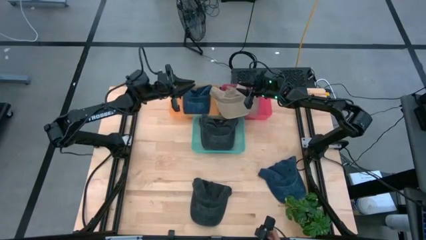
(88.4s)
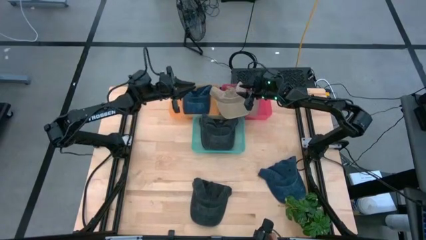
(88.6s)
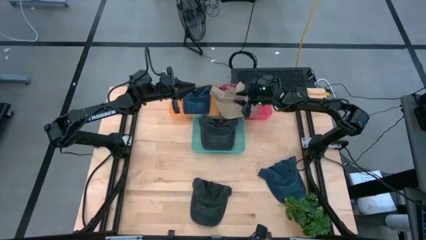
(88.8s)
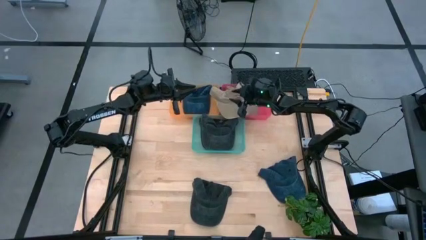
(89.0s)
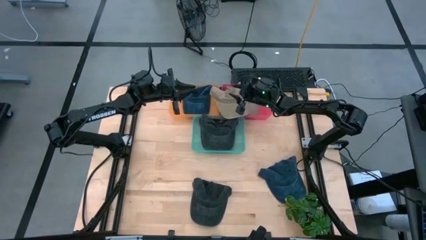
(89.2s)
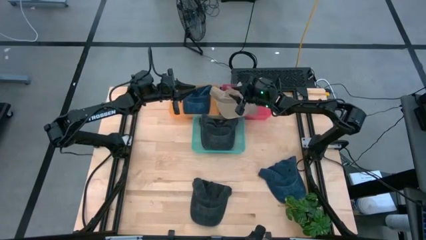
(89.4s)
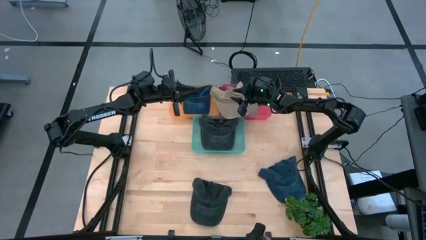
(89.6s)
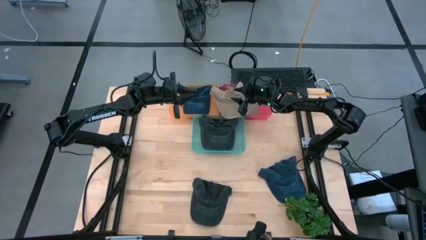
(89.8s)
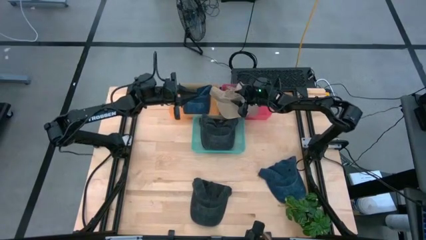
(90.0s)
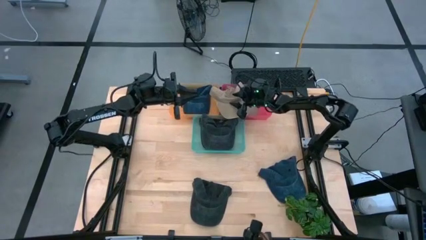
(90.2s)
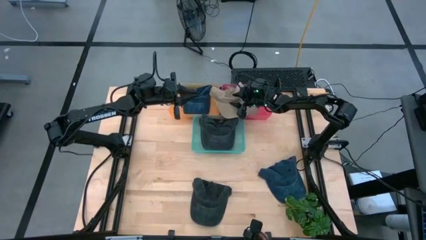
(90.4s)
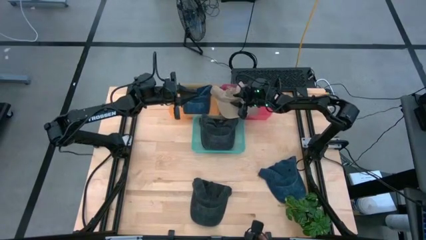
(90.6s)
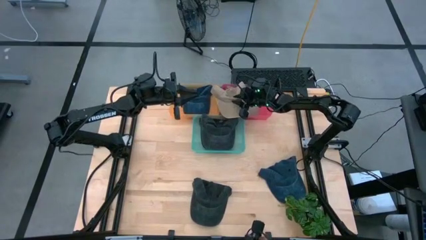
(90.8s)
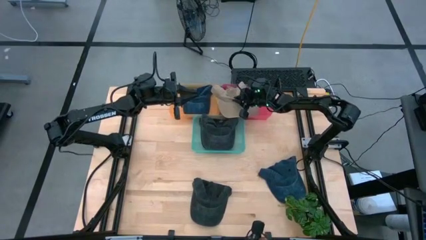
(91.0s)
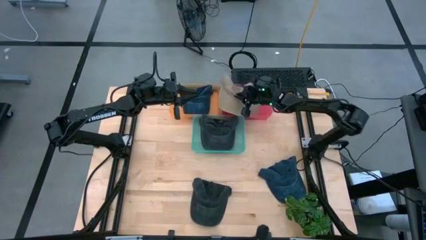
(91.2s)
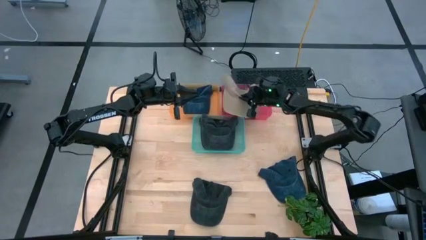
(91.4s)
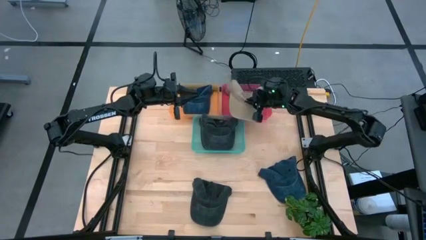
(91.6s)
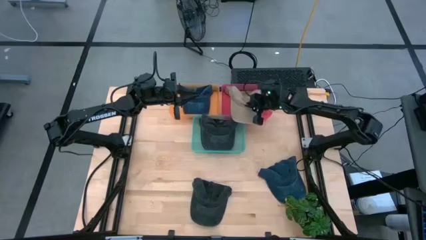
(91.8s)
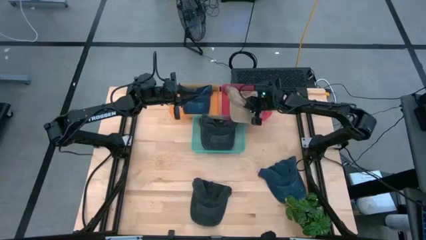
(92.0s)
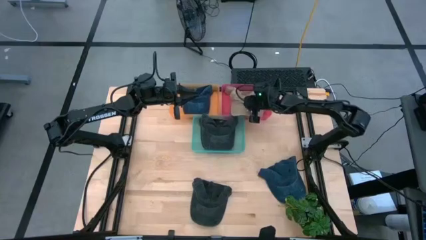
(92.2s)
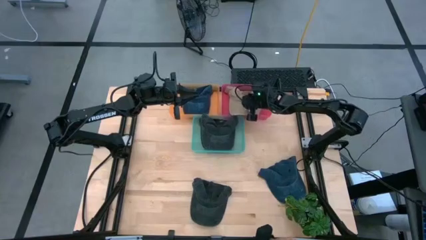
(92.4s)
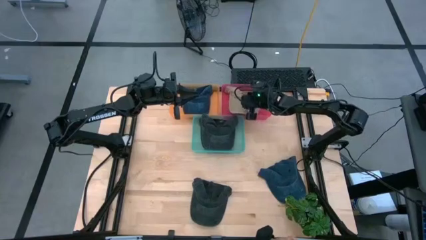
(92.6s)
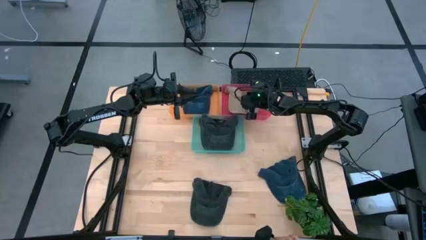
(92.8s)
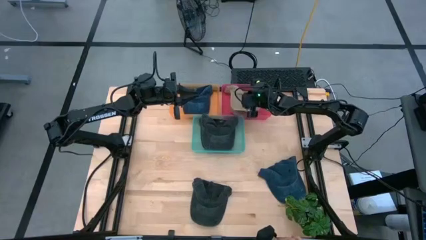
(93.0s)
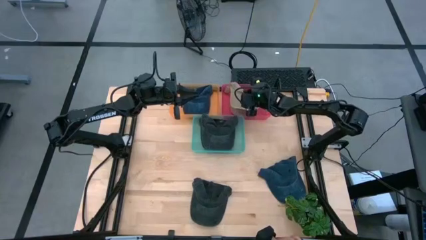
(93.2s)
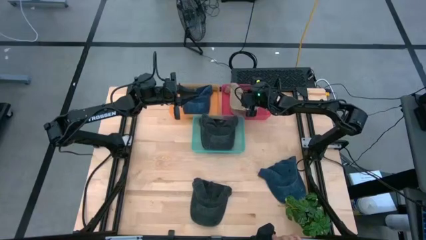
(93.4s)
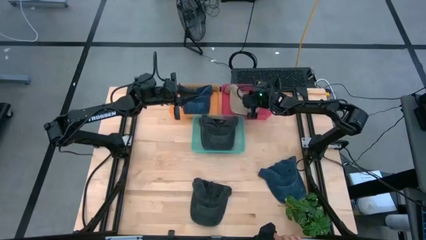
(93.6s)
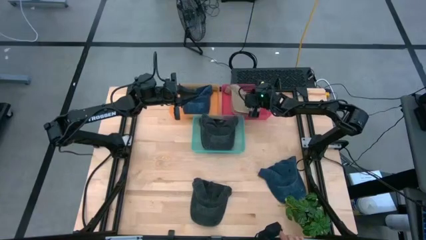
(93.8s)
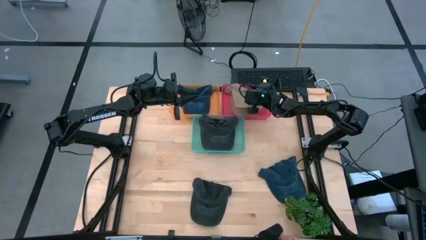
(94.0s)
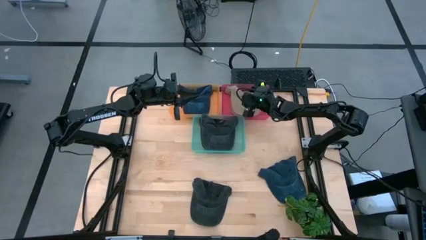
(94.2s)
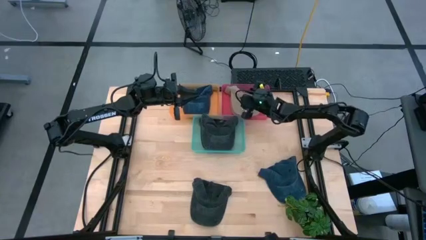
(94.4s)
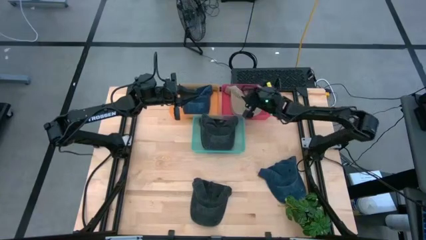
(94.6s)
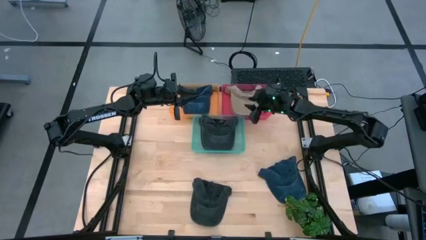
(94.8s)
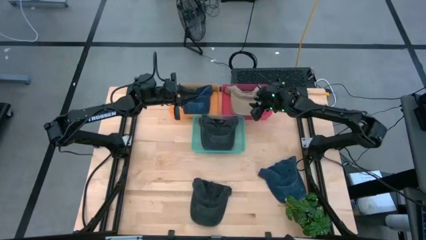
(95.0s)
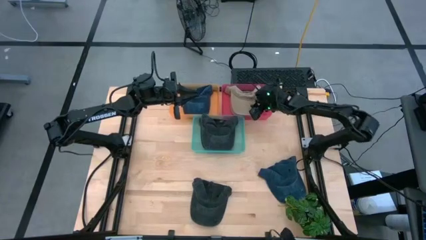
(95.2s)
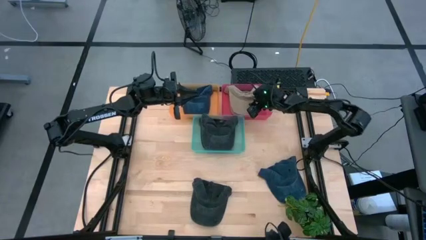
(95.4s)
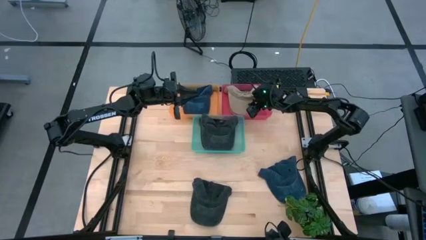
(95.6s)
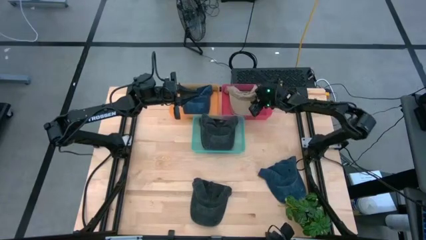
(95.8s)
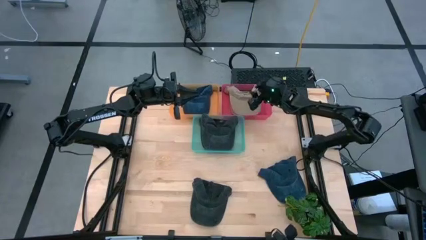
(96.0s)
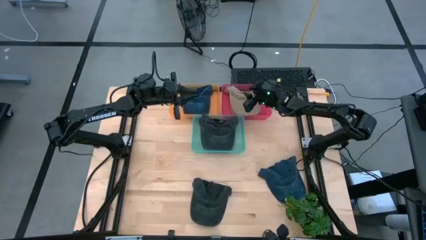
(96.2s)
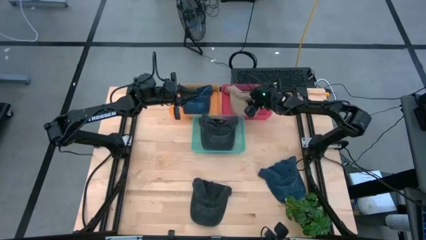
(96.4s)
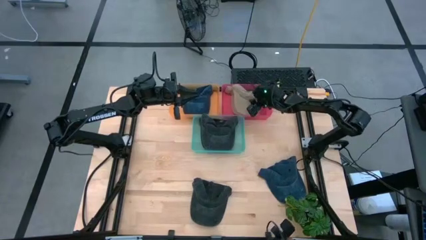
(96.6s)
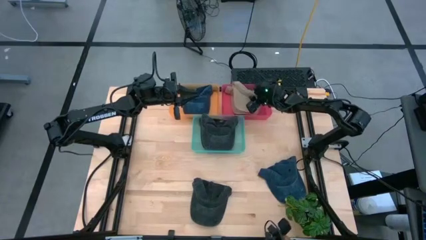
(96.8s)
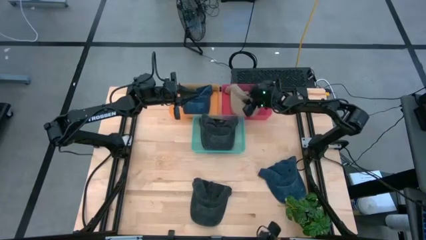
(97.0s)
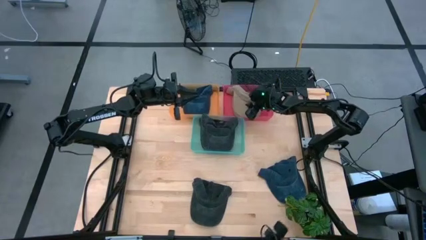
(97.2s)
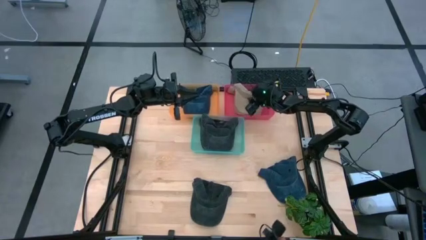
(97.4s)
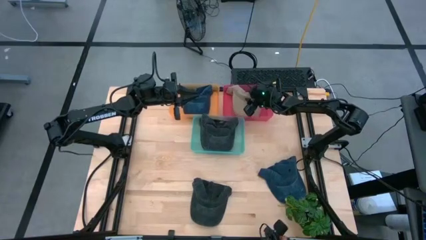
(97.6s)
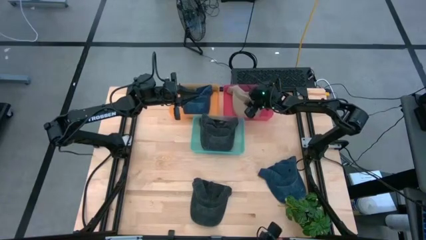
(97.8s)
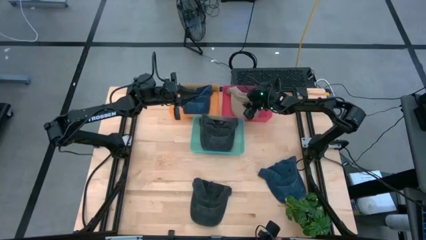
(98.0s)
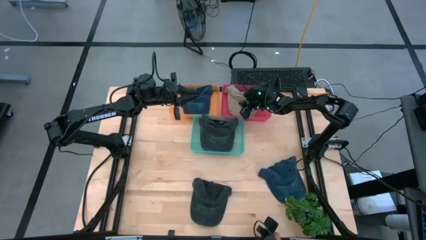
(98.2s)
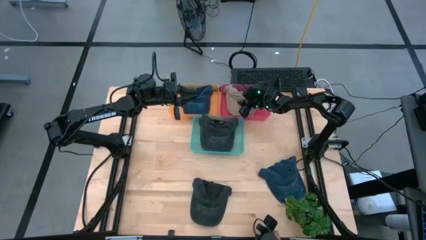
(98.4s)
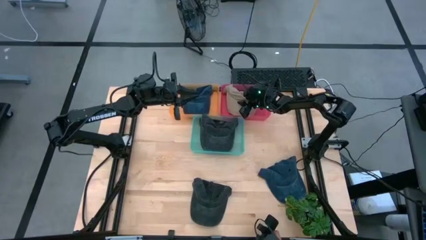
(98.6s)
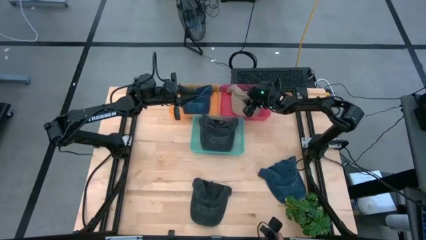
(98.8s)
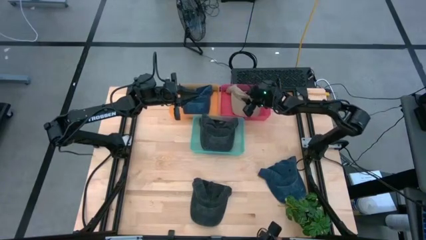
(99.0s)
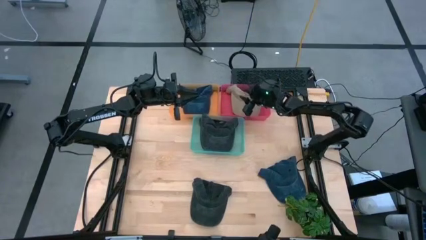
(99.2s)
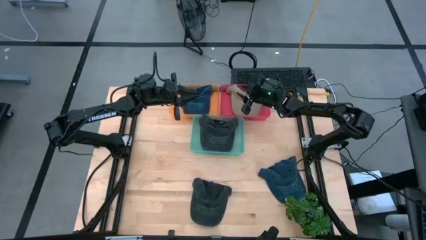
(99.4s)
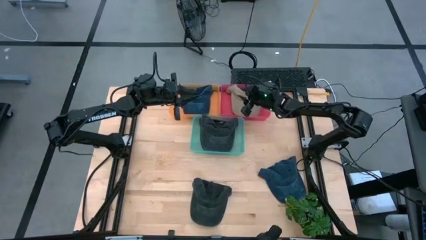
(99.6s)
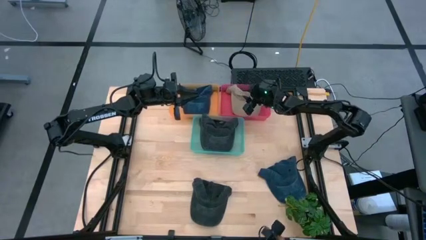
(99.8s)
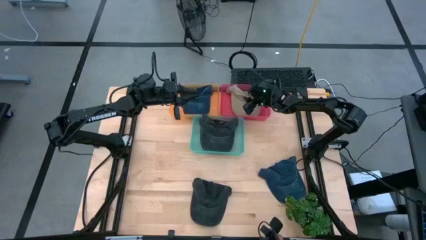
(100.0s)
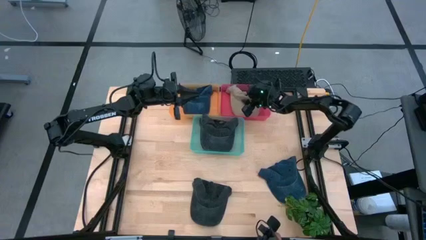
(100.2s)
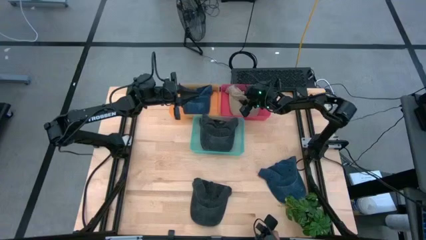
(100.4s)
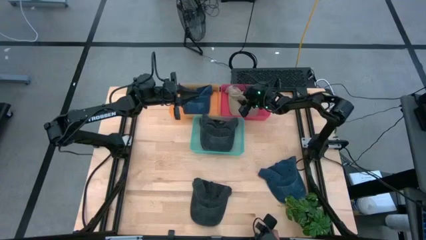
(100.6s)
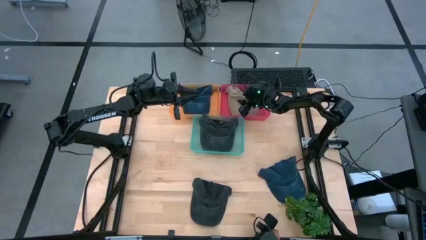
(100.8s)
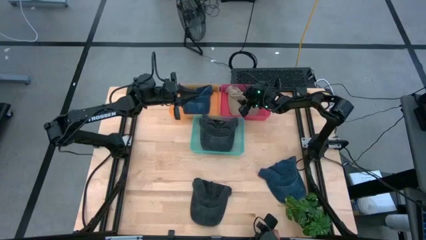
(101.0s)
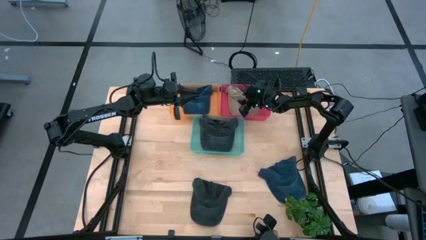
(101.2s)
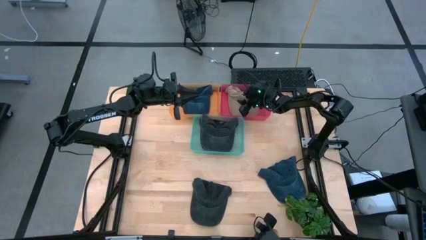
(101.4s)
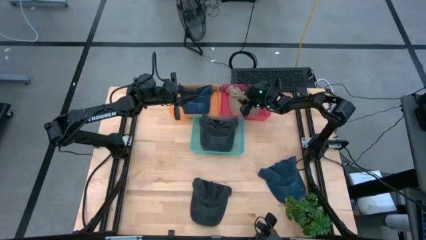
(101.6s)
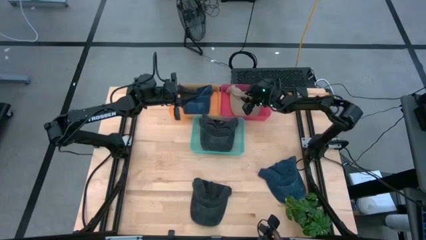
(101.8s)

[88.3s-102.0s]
Task: Pick & Place hat
Put the brown cap into the pink bin

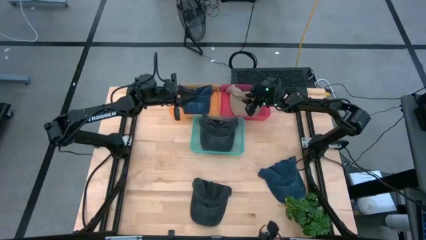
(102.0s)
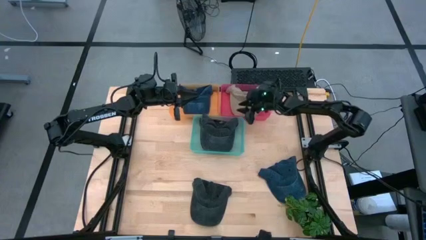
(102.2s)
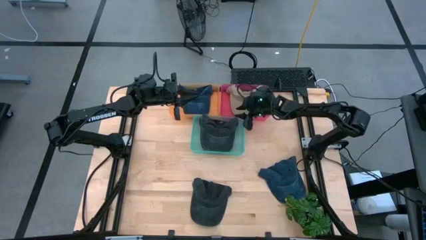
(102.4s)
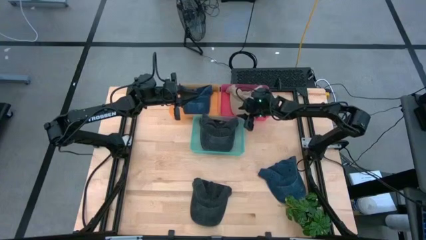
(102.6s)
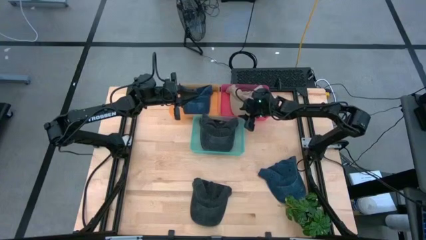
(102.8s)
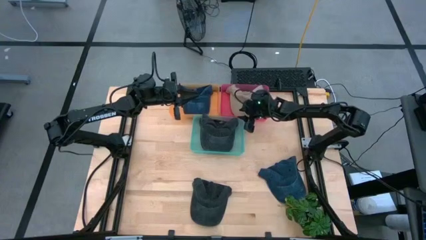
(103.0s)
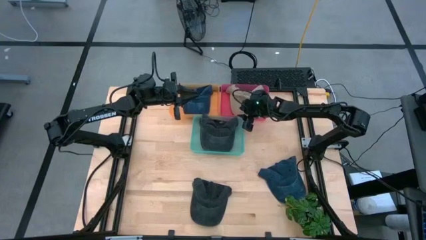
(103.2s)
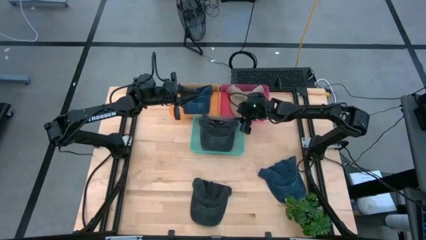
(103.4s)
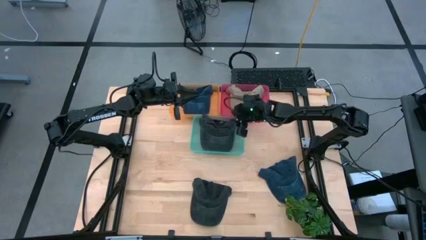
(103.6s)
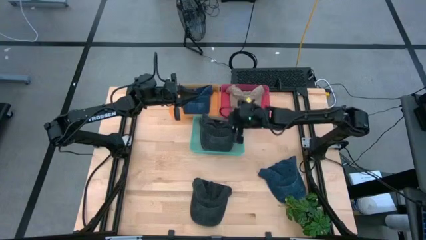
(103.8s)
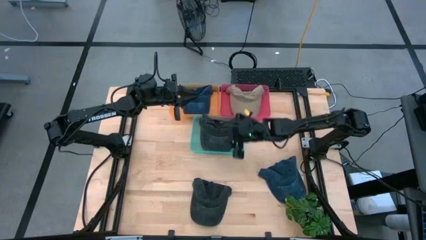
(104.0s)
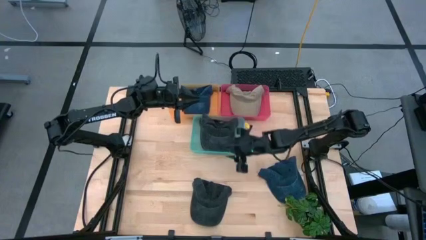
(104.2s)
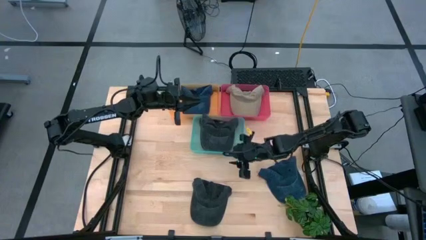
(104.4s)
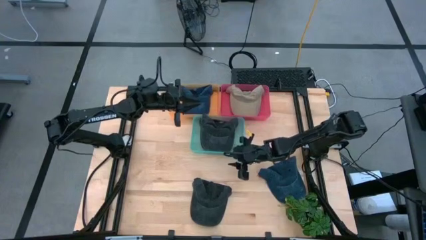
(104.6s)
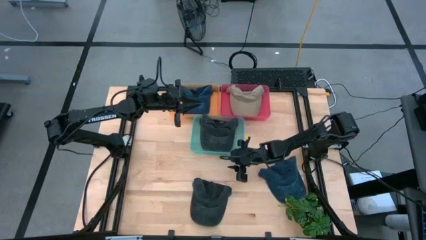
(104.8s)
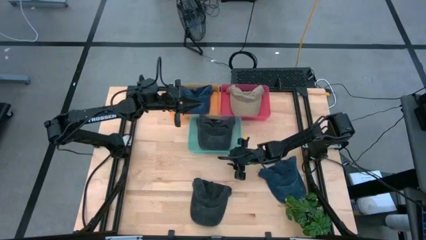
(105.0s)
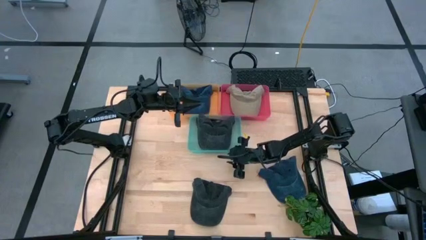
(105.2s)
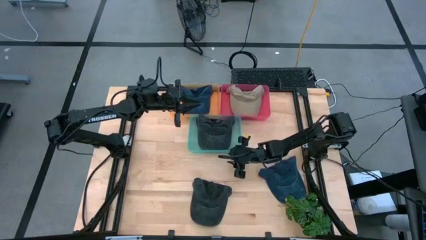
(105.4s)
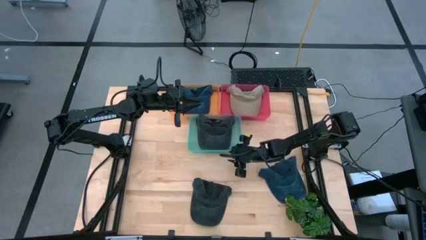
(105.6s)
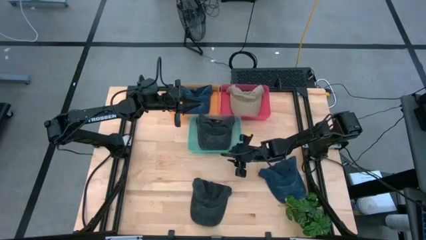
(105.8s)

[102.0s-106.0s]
Adjust the blue bin
